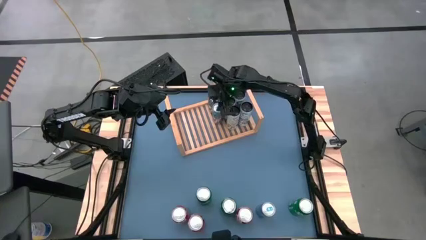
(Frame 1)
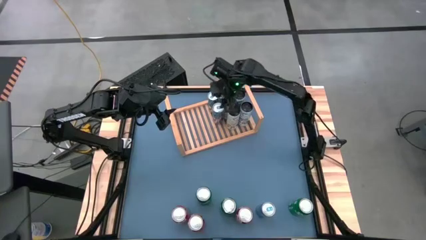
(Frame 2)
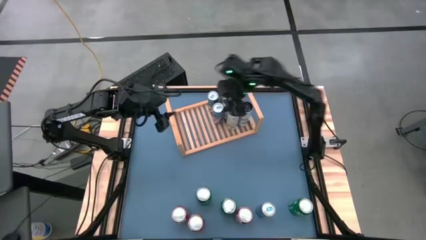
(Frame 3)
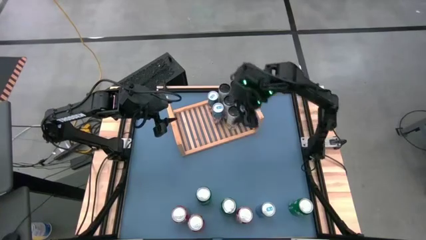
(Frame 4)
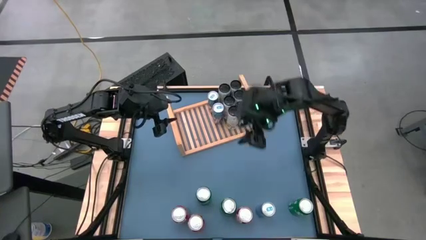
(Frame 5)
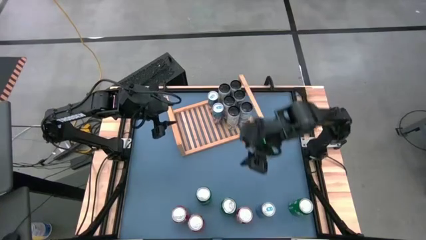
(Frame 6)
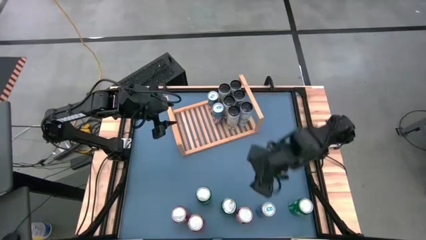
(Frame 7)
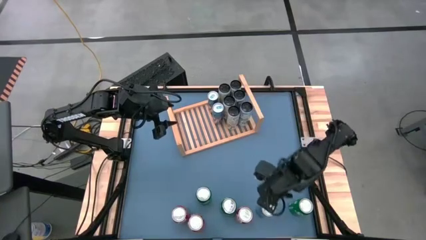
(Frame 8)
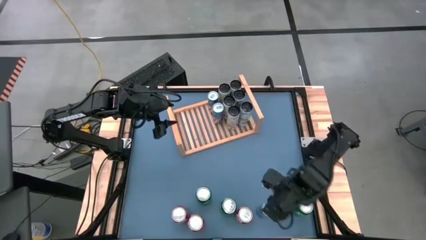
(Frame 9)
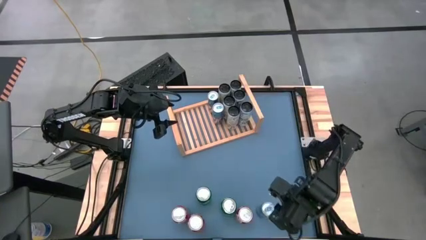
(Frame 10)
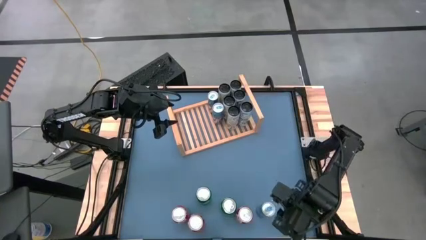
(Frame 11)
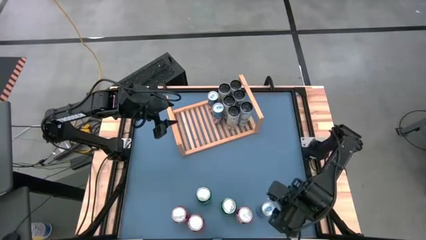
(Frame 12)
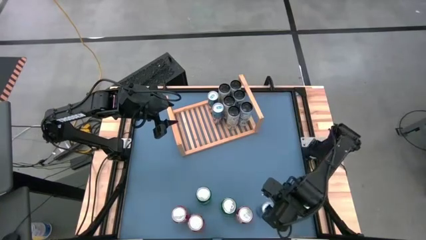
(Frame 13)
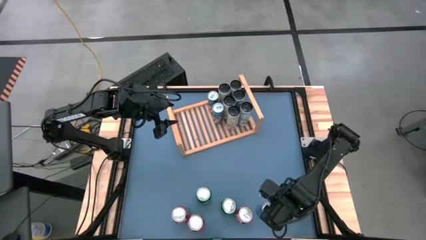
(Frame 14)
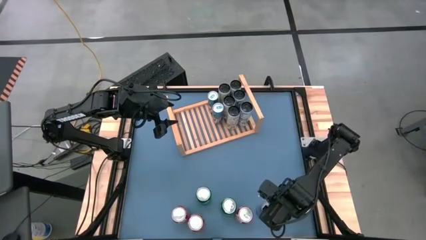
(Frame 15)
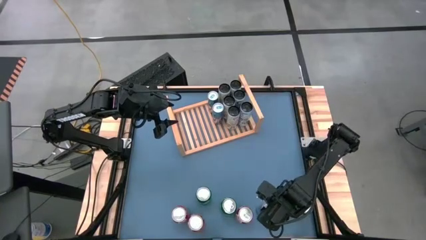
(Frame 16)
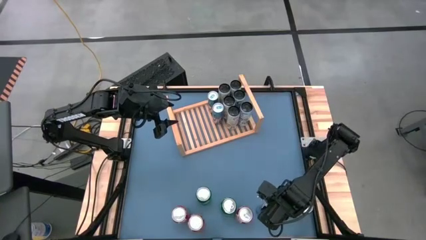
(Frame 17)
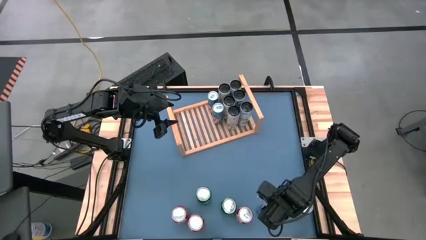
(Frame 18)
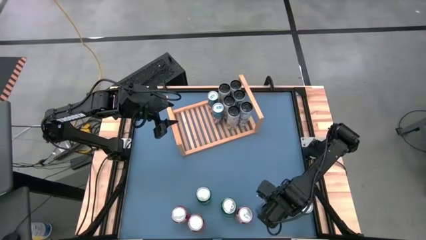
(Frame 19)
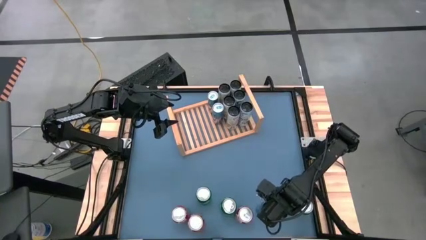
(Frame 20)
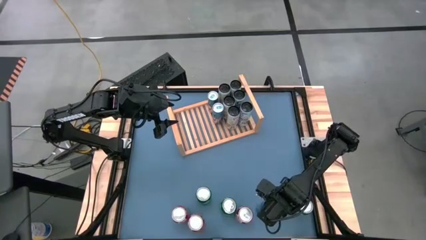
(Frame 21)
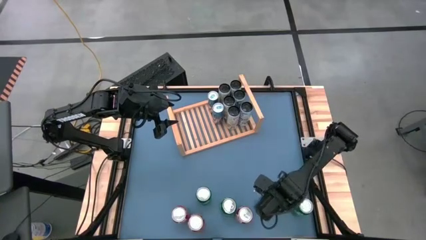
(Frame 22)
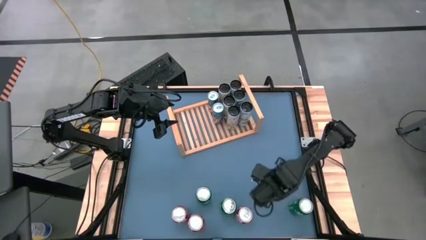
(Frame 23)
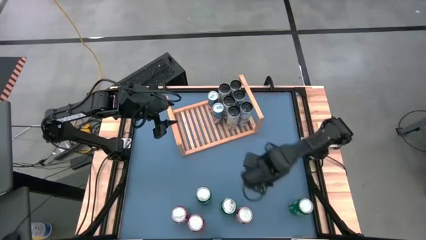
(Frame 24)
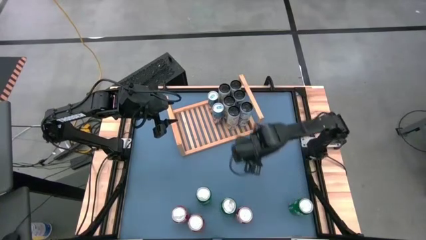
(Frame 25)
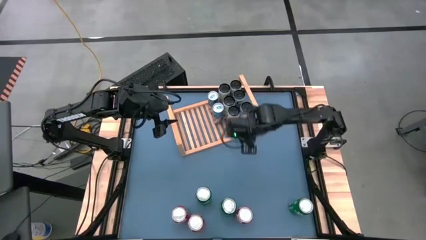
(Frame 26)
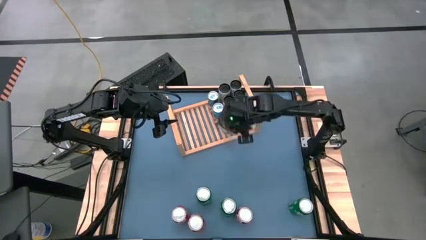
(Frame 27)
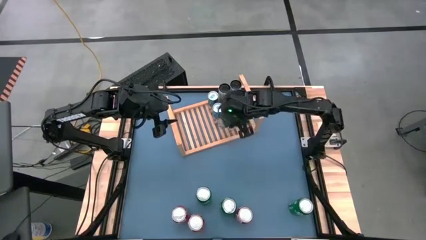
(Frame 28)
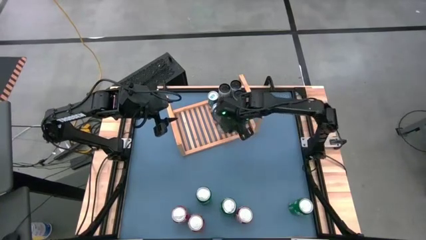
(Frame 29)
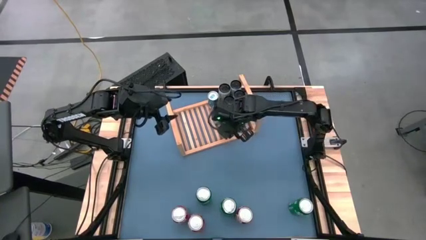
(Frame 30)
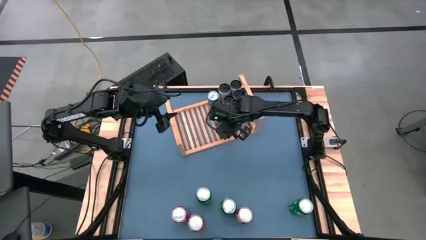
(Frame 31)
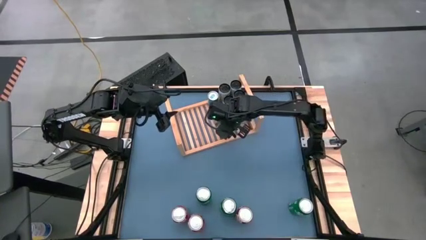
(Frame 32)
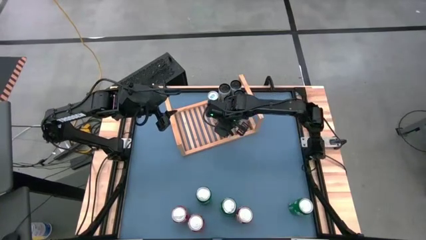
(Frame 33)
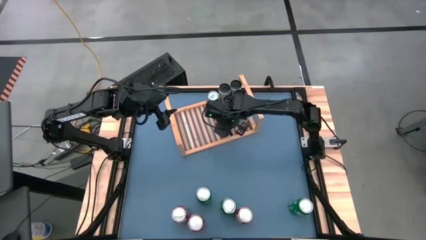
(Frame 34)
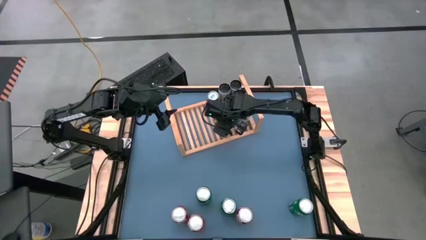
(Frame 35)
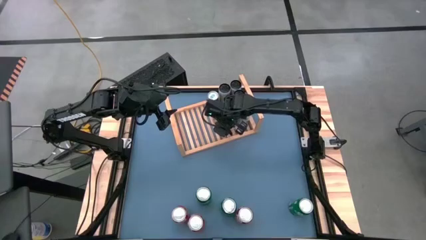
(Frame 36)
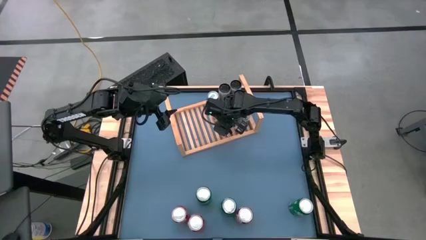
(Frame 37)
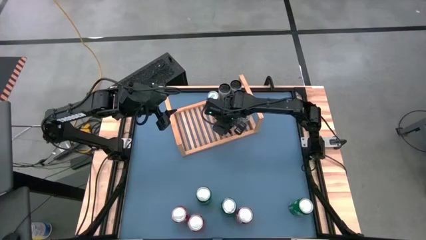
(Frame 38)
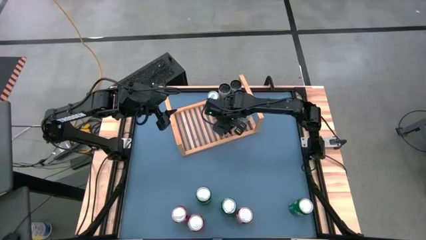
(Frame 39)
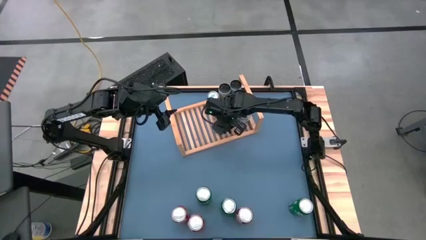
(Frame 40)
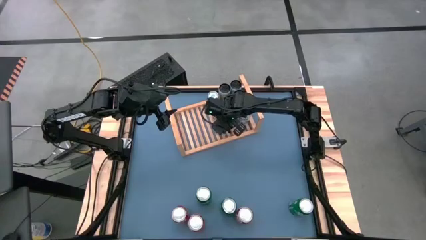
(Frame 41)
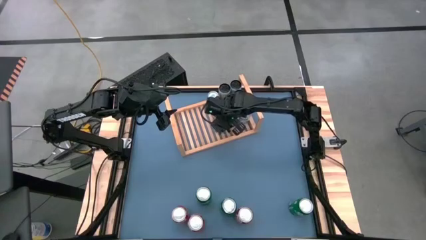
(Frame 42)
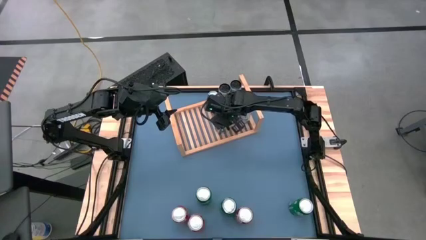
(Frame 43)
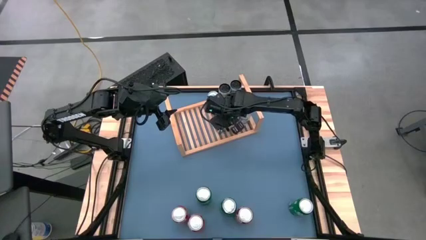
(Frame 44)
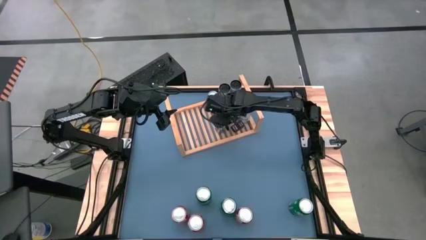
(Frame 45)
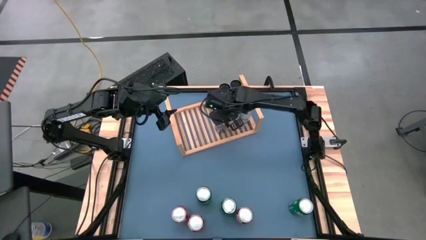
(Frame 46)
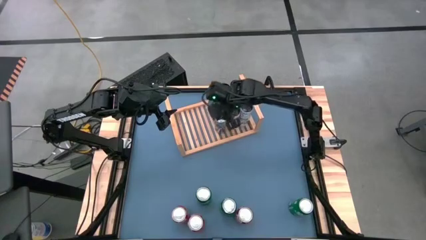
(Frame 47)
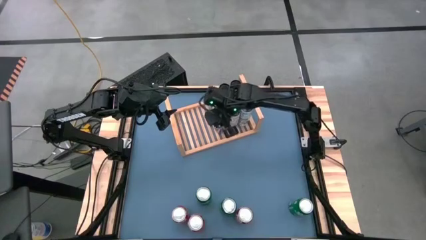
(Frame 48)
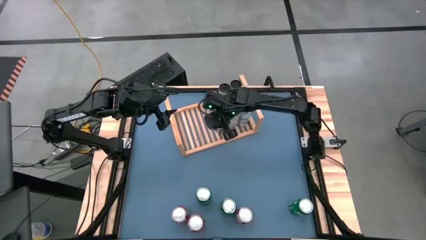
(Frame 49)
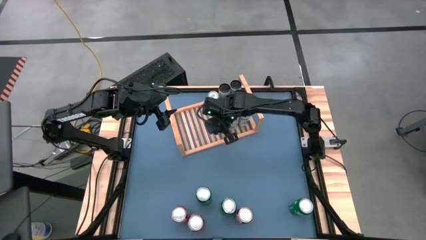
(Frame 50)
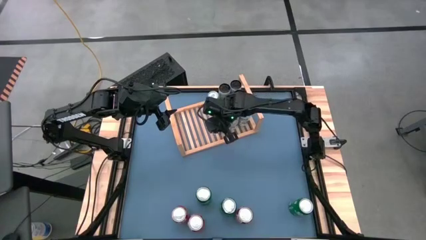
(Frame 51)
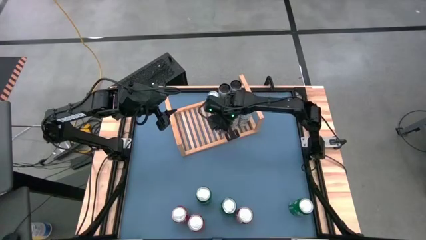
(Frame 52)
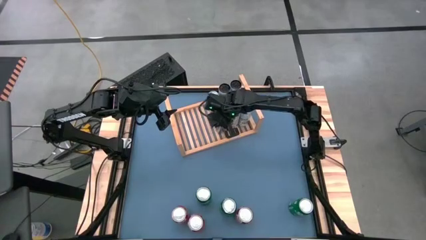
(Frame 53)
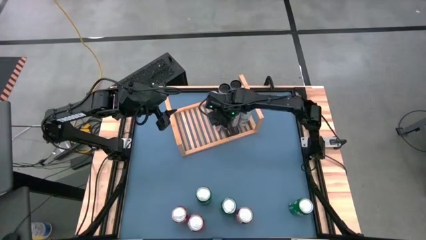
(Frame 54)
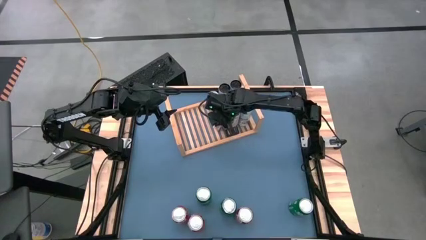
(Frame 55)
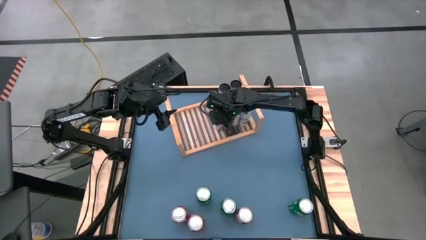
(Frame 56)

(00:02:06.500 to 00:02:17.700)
Task: Place canned beverage on shelf
Put the blue soda can on the shelf aligned with the other blue soda cans
